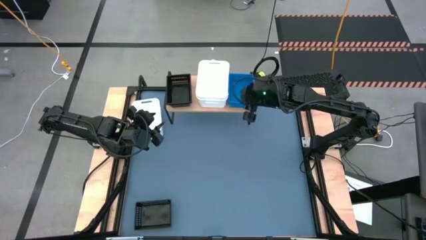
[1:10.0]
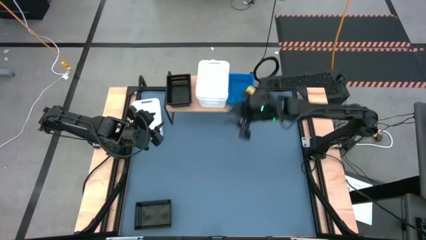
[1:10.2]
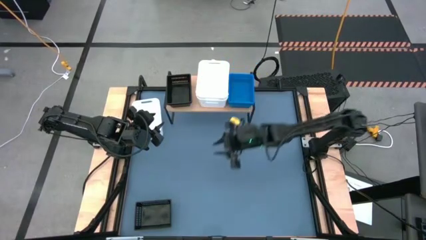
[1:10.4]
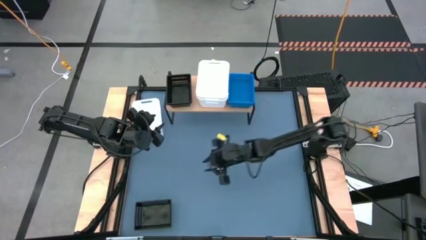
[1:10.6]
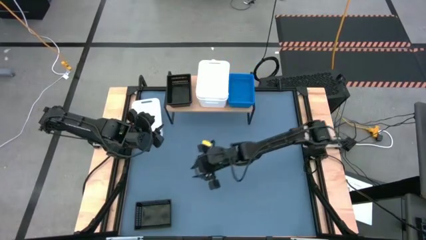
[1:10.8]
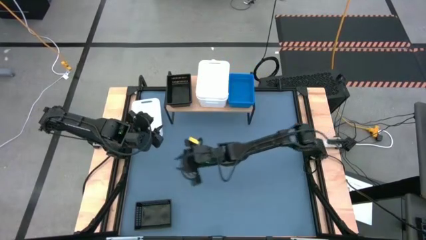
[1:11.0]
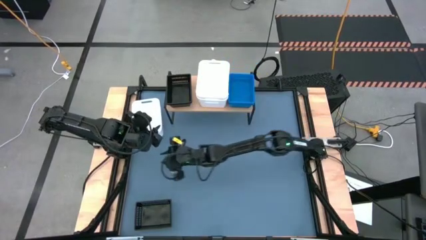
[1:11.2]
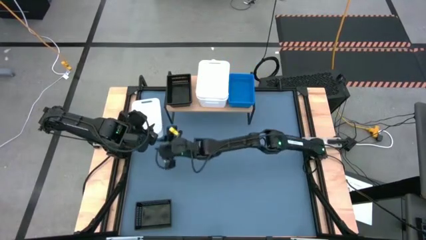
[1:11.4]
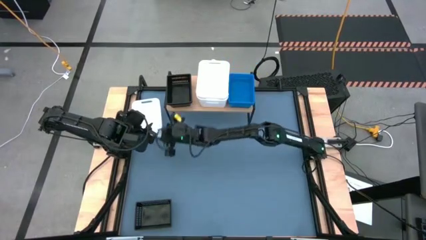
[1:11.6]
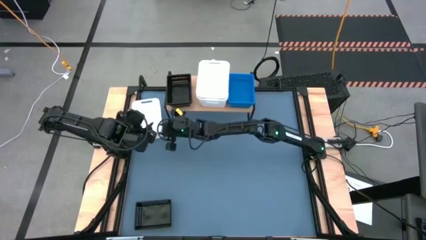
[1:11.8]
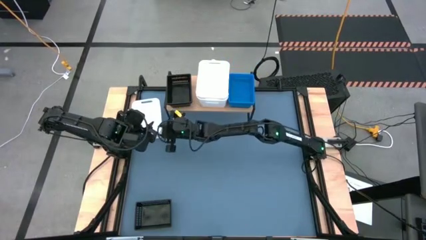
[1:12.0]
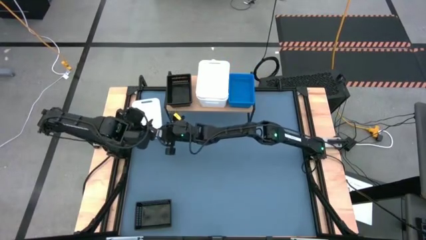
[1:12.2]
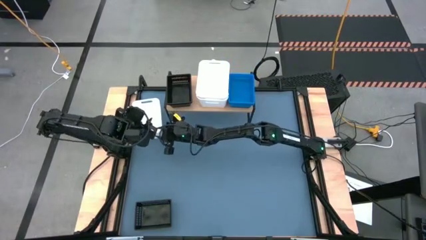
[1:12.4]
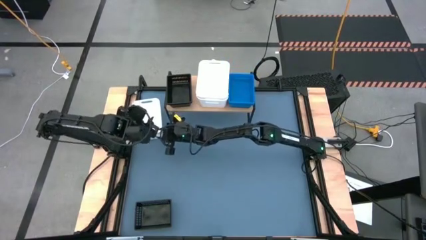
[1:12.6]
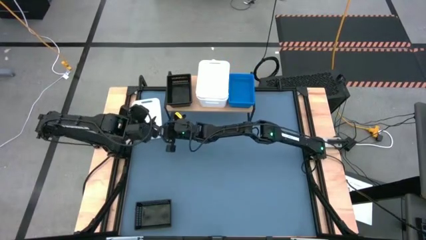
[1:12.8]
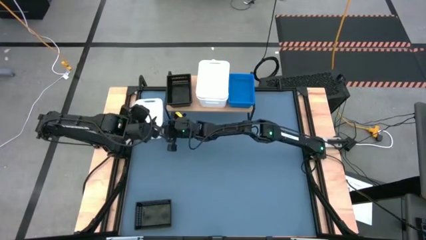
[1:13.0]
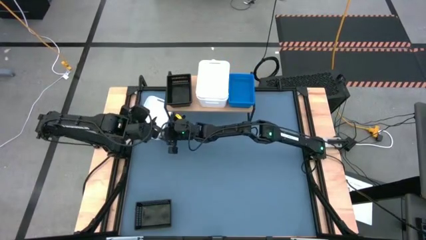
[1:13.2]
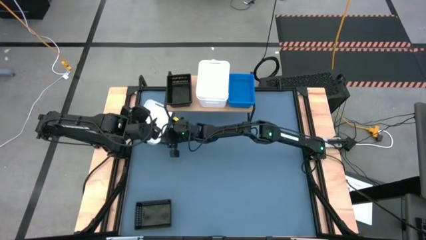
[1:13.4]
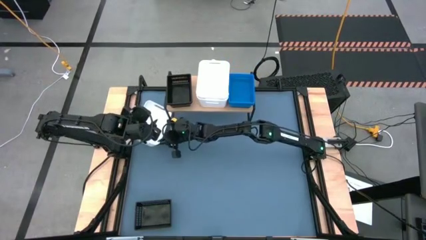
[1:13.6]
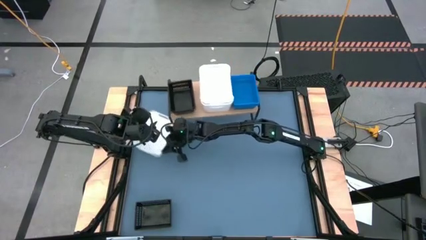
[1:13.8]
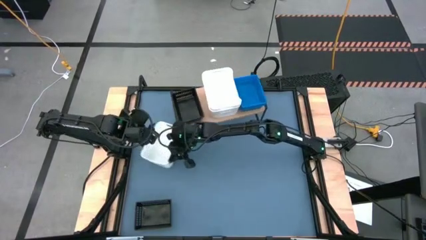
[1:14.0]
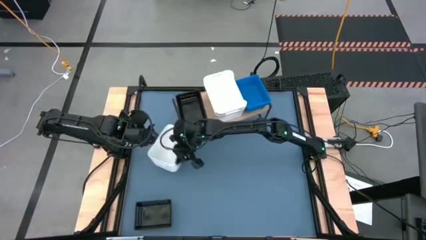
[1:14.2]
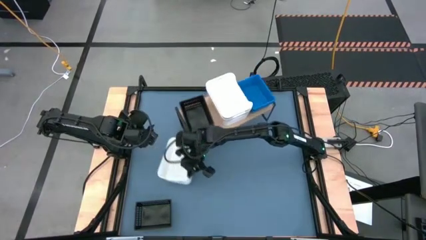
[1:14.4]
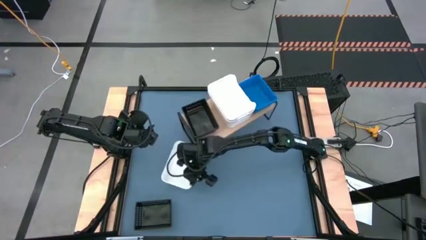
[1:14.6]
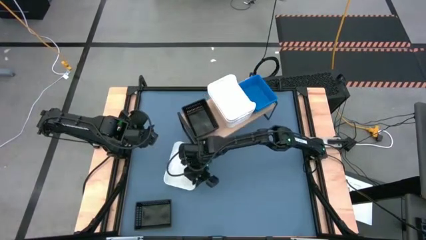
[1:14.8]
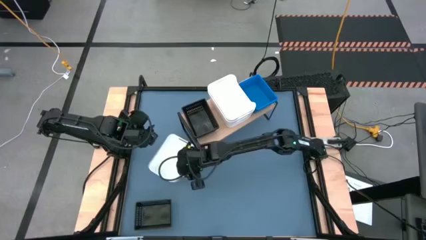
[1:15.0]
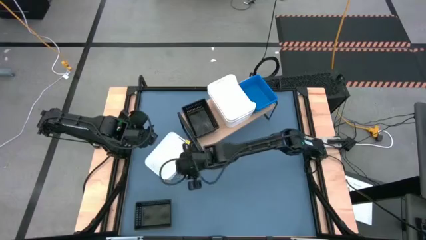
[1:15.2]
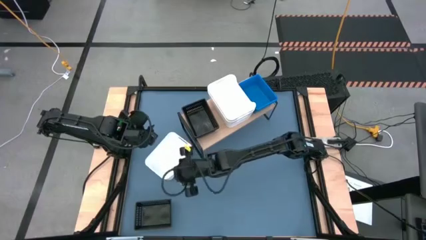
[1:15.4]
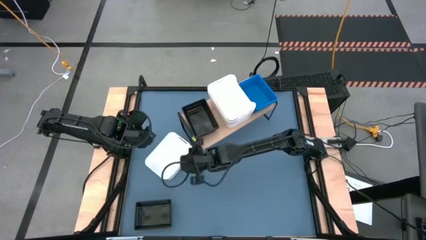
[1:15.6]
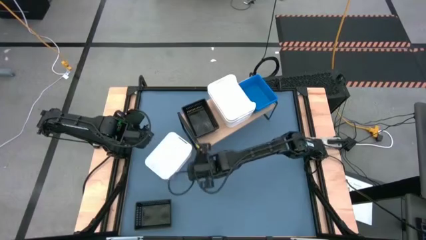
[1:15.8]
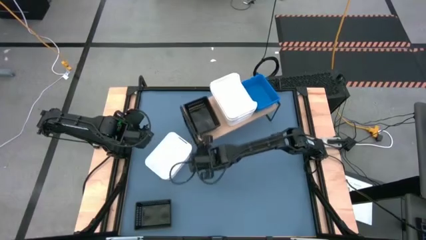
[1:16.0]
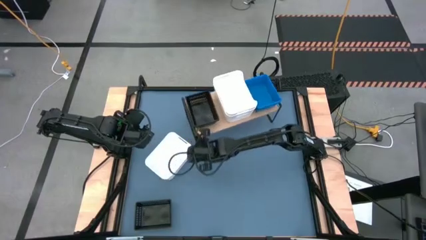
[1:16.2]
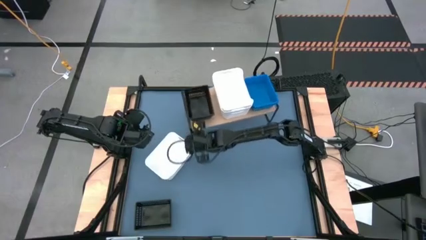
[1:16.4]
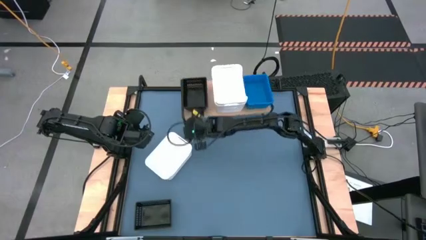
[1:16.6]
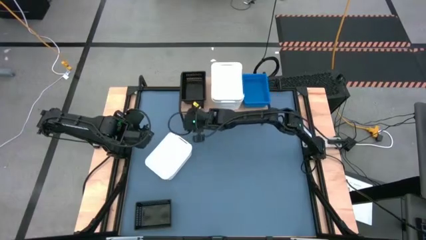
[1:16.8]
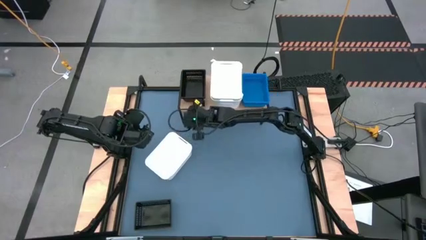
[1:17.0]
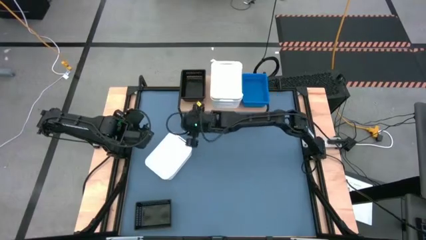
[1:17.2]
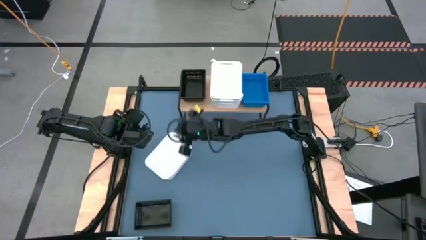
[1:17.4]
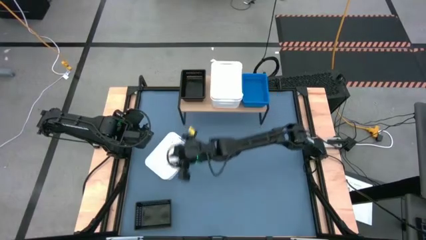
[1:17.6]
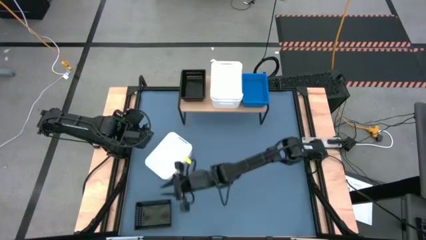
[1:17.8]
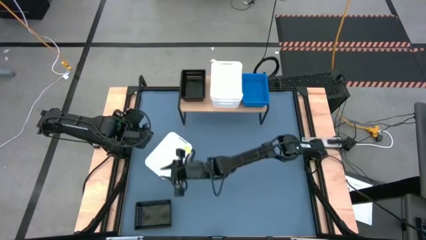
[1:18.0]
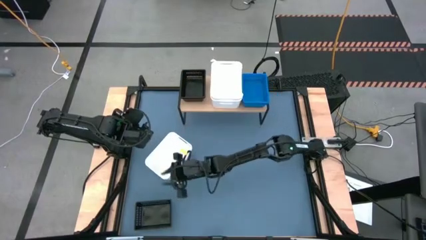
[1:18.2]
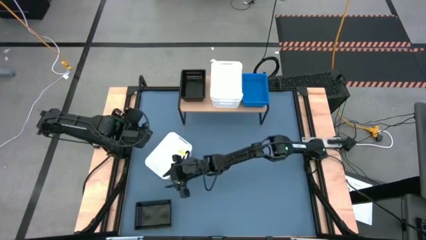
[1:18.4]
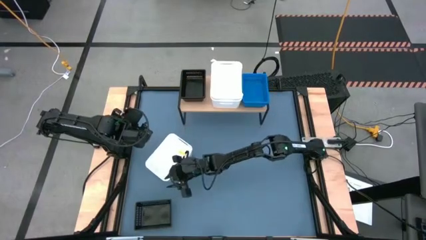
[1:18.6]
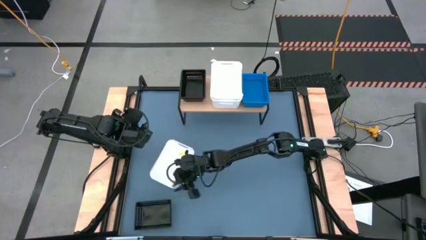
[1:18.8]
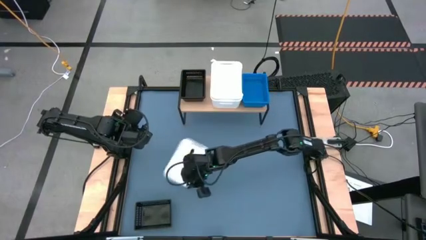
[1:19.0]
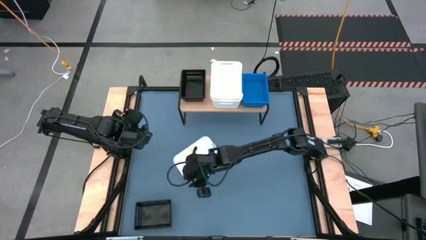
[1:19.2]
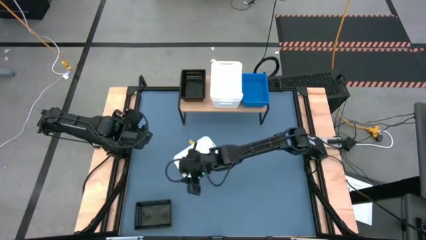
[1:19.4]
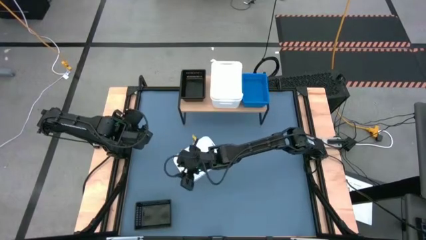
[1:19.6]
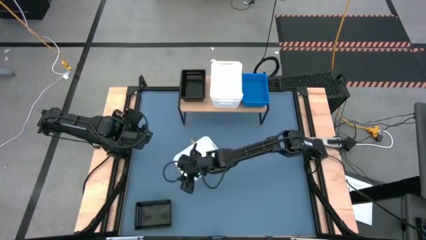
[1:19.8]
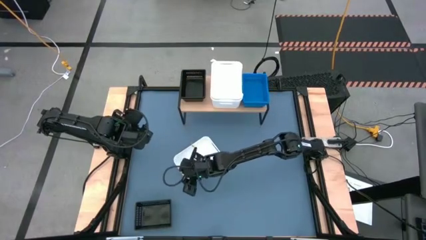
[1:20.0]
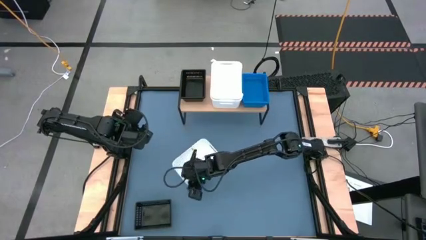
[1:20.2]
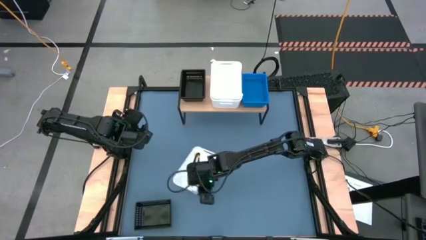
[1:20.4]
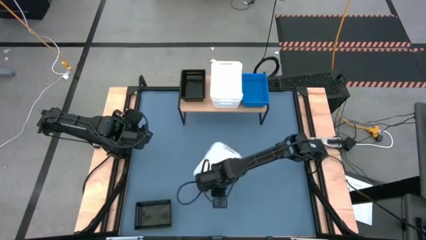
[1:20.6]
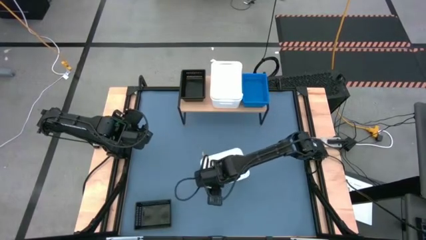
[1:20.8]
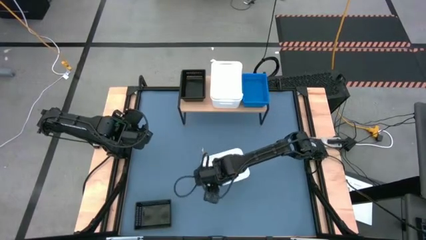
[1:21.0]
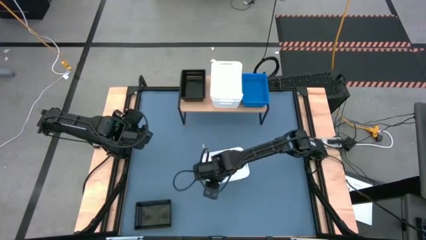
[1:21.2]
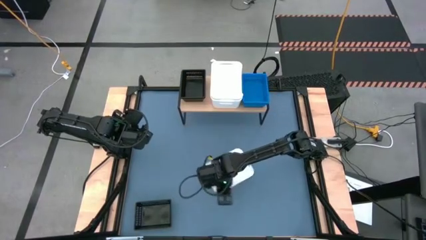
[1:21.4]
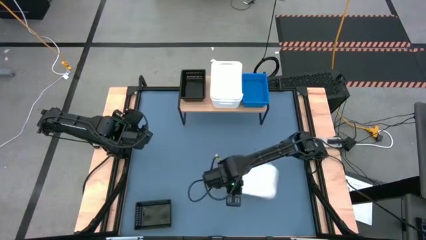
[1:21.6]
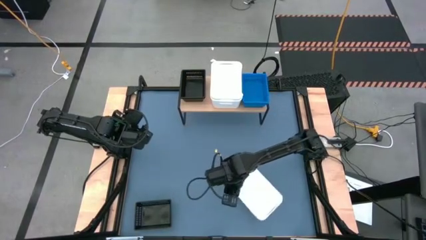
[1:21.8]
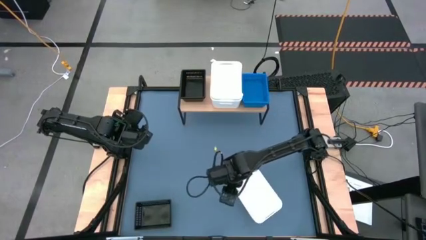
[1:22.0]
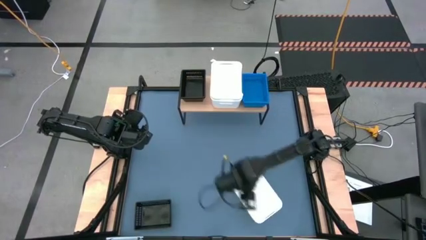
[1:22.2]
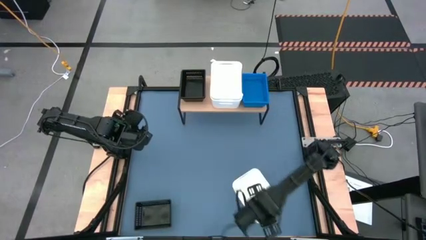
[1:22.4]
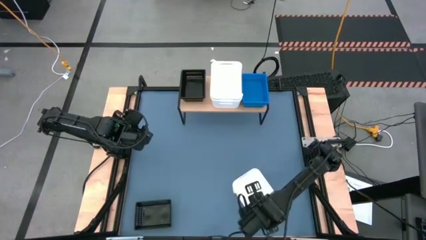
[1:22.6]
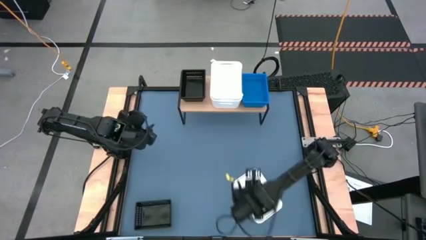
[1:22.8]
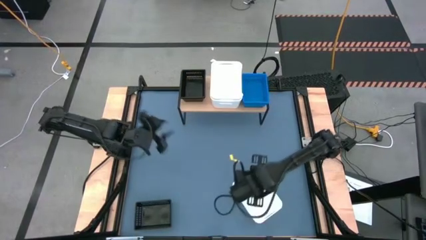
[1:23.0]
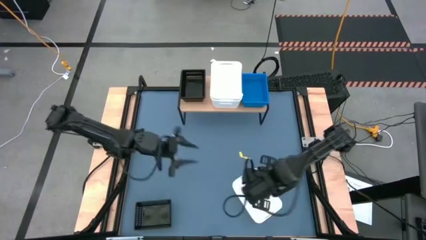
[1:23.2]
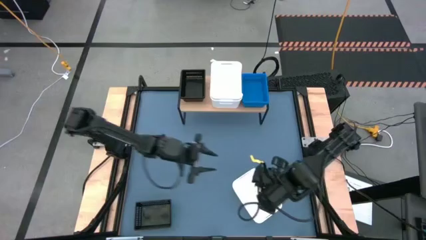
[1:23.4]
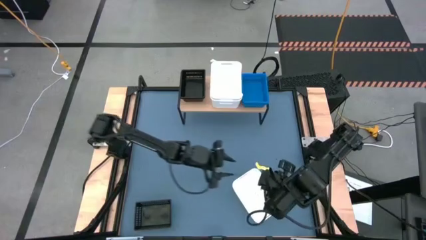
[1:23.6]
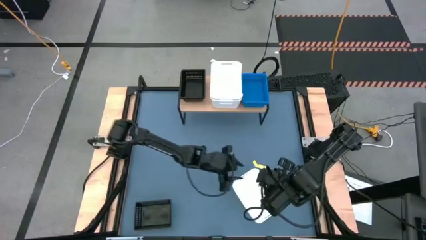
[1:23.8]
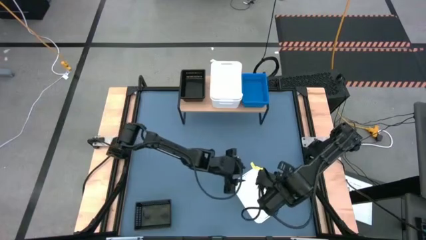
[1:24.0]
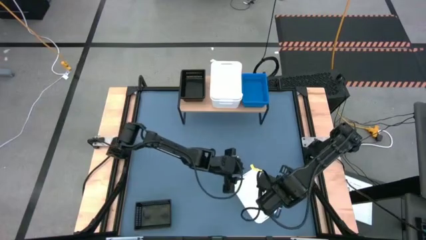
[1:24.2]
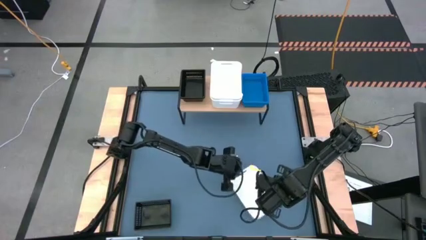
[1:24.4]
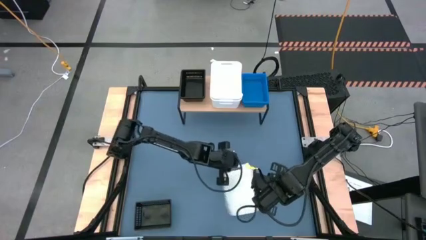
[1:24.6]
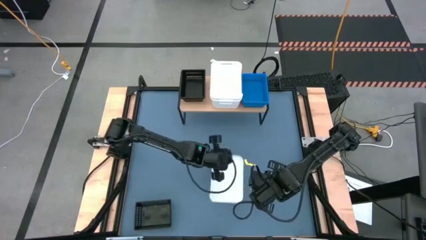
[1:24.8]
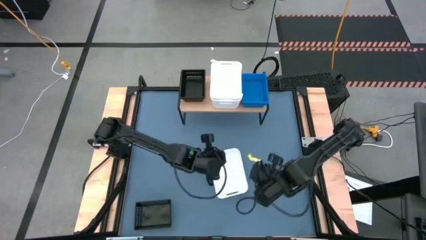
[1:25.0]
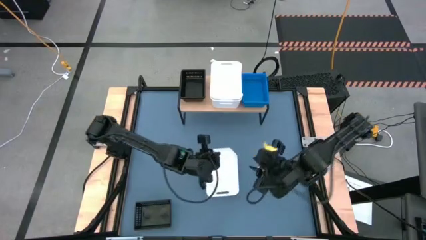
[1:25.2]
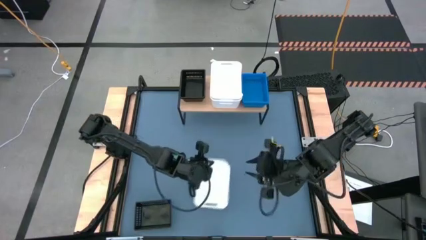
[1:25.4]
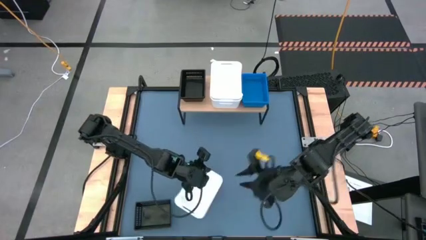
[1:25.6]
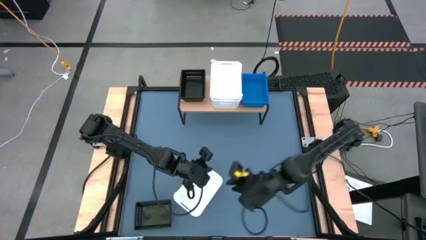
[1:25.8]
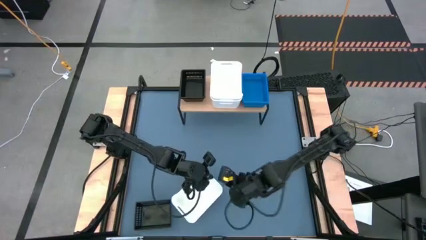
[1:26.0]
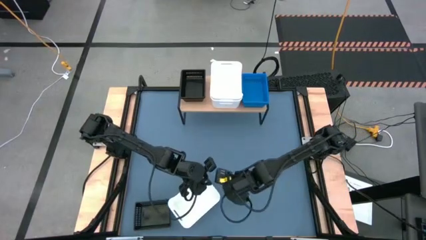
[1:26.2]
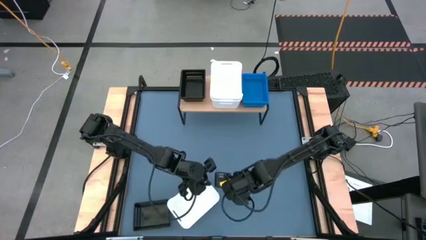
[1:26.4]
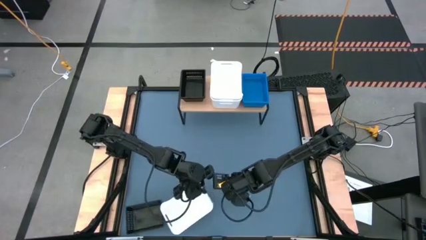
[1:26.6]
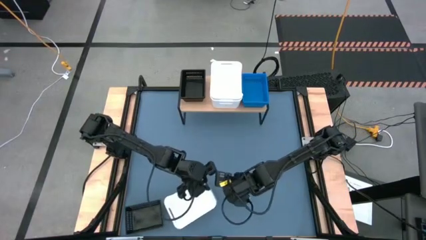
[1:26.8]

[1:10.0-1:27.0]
Task: Stack baskets on shelf by color
Stack the white bin on top of the other white bins on the shelf
